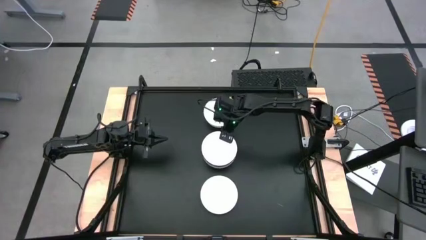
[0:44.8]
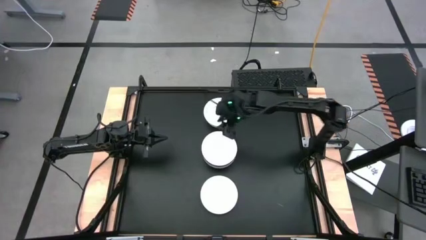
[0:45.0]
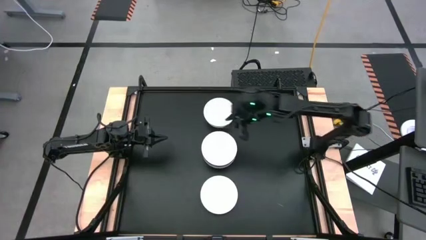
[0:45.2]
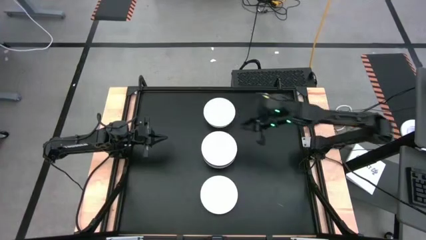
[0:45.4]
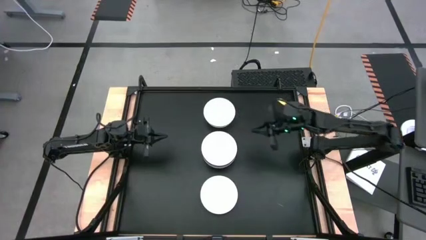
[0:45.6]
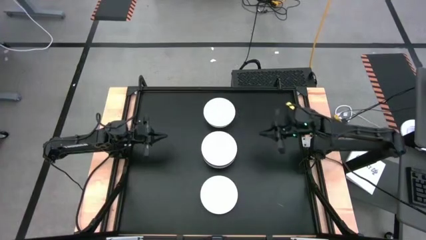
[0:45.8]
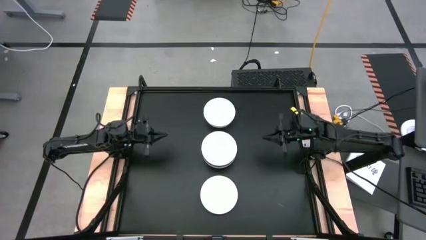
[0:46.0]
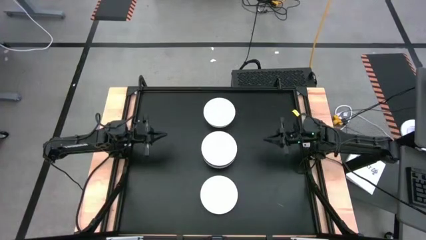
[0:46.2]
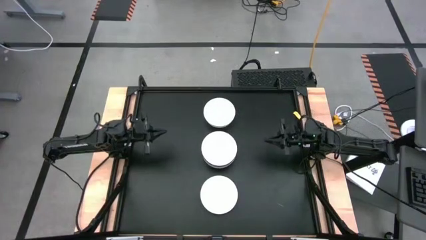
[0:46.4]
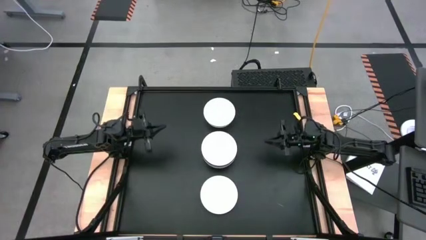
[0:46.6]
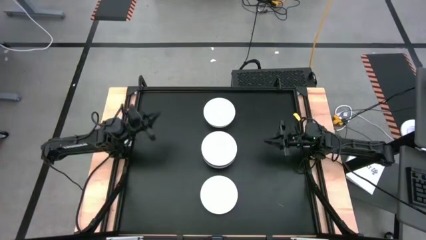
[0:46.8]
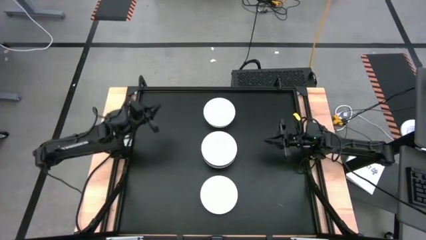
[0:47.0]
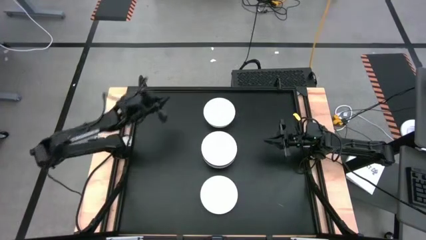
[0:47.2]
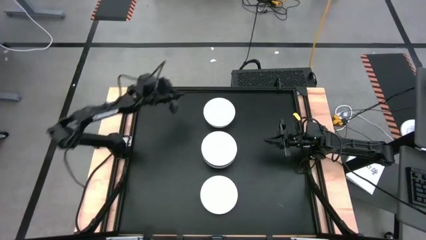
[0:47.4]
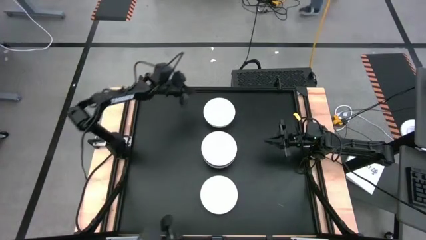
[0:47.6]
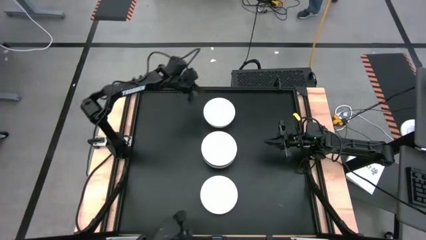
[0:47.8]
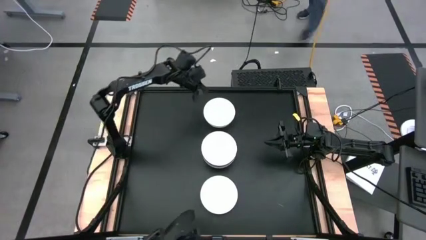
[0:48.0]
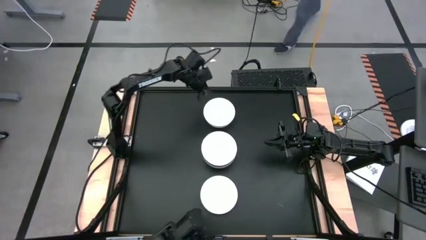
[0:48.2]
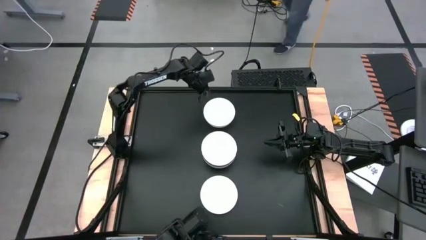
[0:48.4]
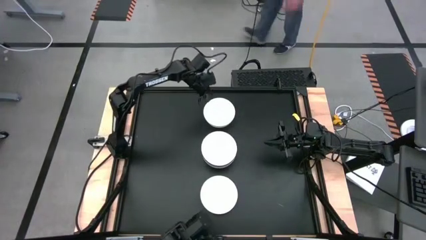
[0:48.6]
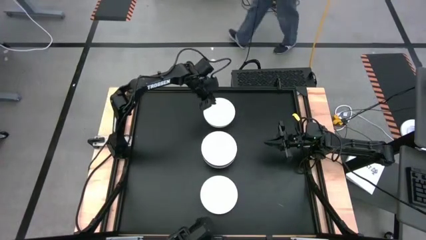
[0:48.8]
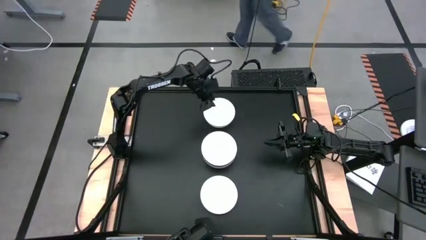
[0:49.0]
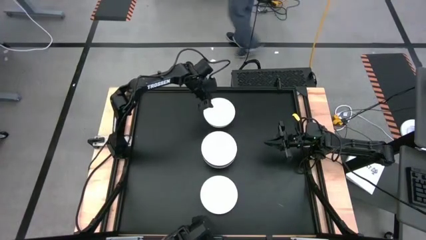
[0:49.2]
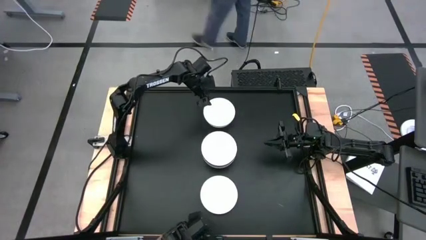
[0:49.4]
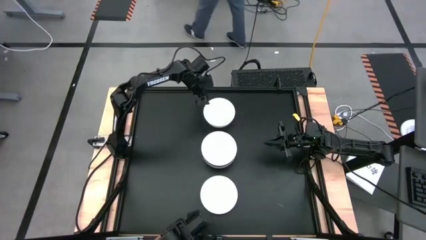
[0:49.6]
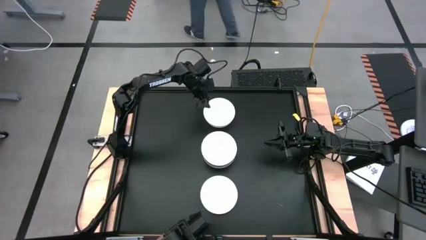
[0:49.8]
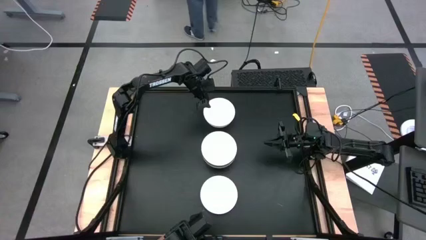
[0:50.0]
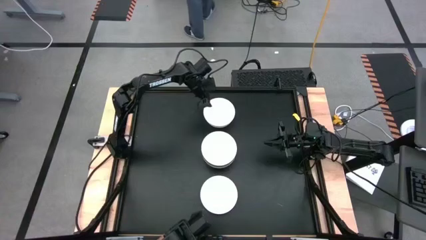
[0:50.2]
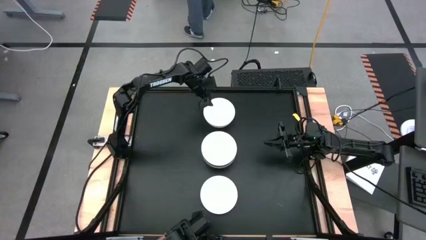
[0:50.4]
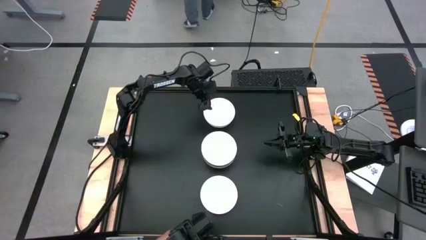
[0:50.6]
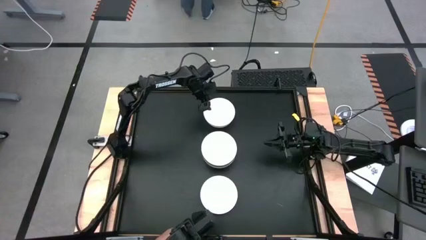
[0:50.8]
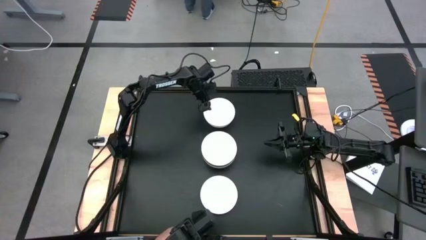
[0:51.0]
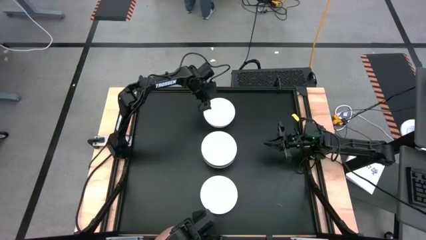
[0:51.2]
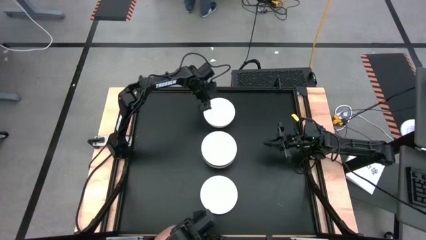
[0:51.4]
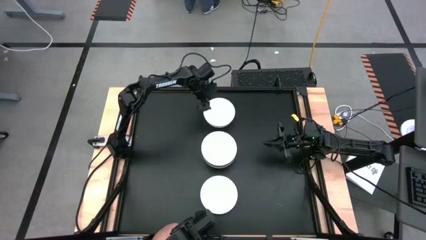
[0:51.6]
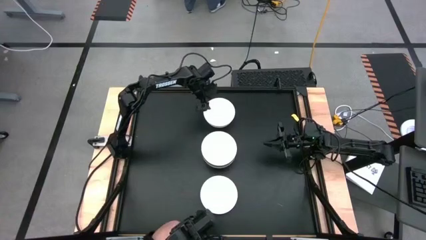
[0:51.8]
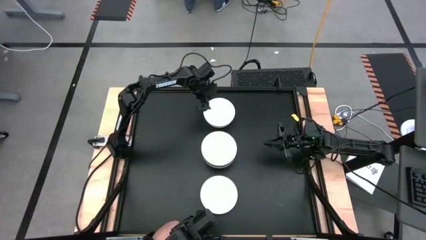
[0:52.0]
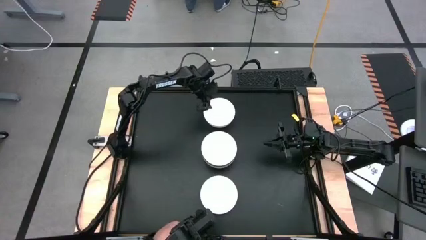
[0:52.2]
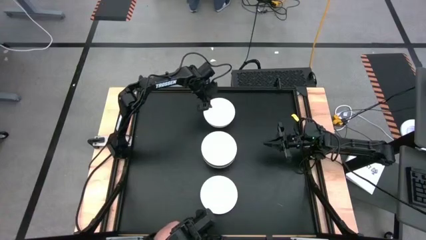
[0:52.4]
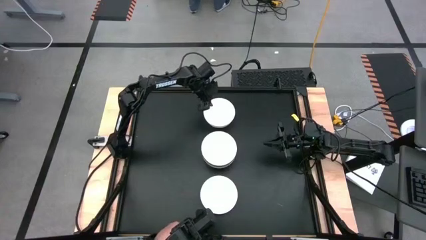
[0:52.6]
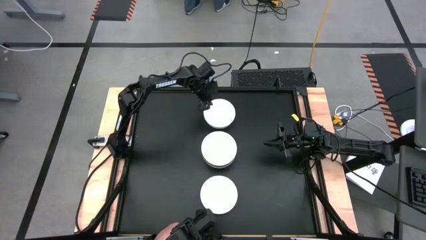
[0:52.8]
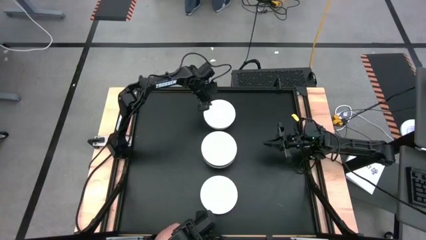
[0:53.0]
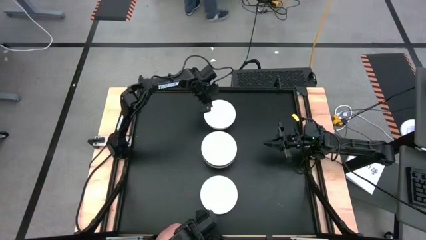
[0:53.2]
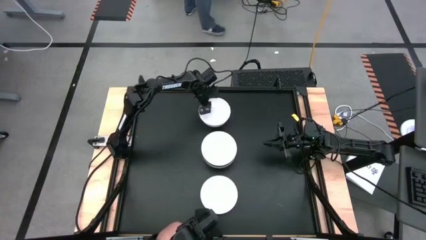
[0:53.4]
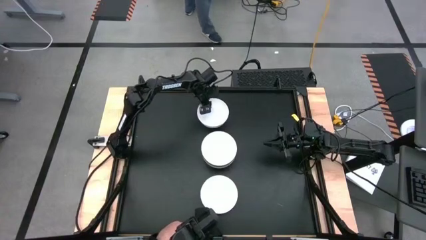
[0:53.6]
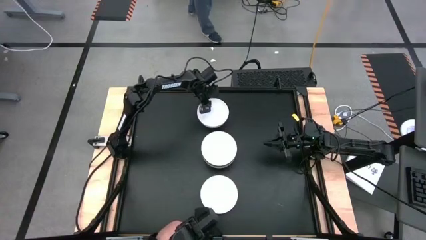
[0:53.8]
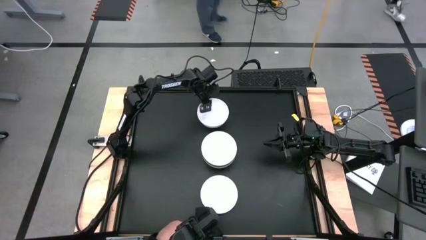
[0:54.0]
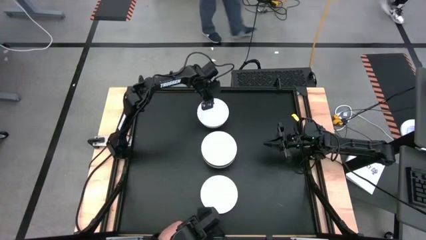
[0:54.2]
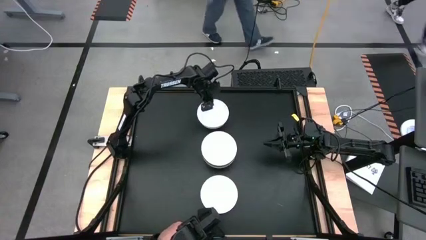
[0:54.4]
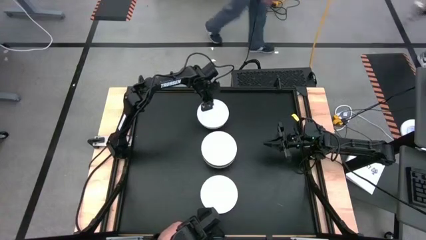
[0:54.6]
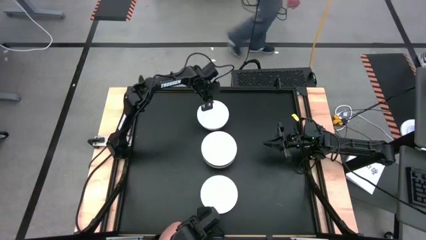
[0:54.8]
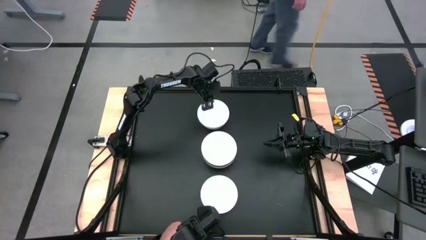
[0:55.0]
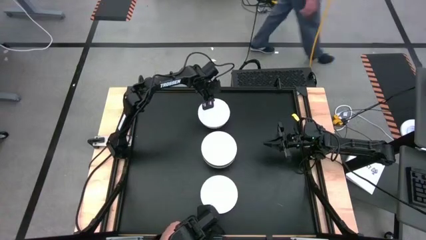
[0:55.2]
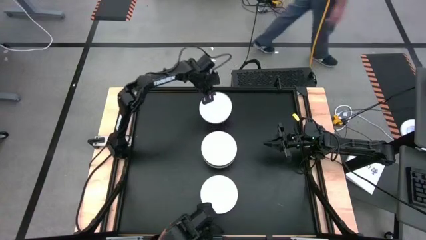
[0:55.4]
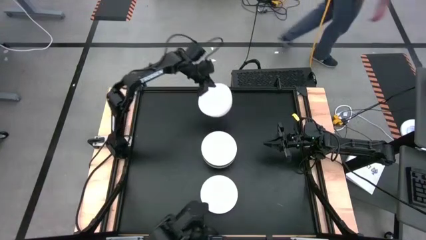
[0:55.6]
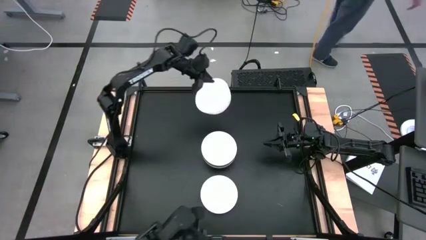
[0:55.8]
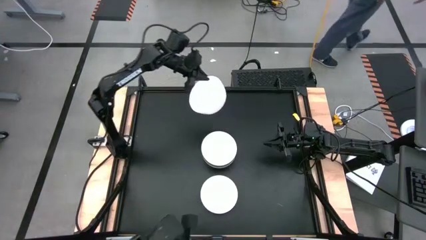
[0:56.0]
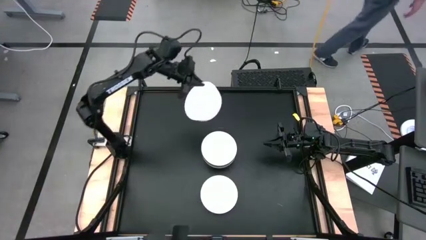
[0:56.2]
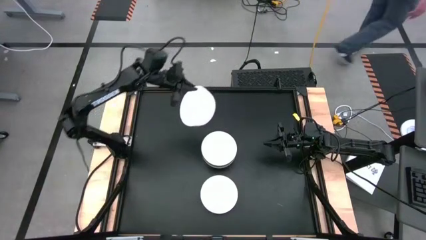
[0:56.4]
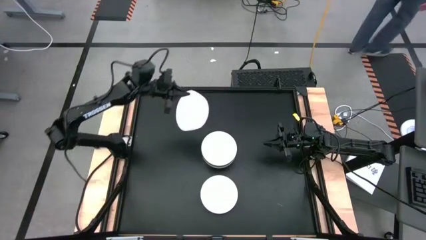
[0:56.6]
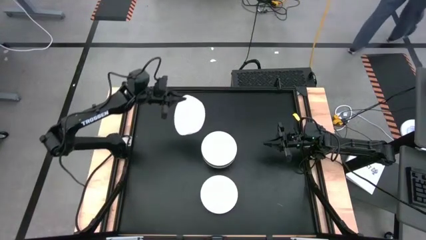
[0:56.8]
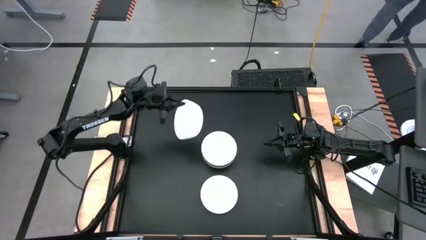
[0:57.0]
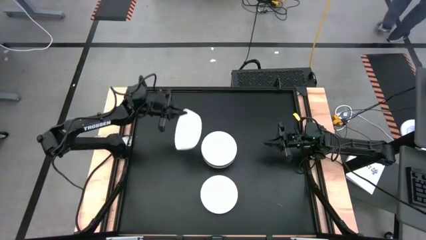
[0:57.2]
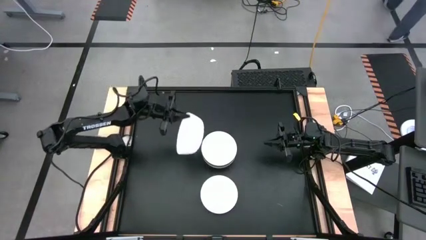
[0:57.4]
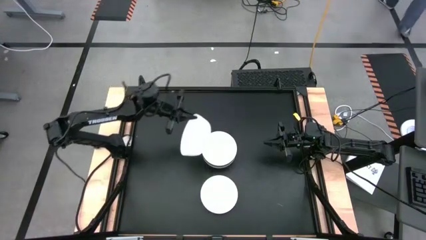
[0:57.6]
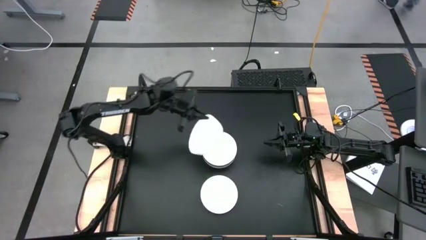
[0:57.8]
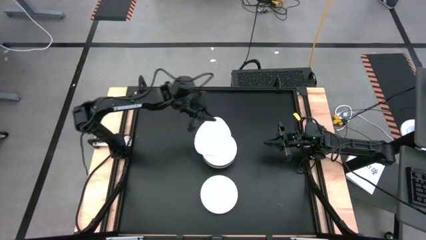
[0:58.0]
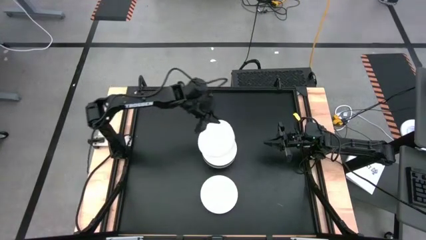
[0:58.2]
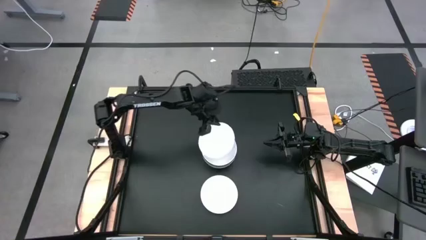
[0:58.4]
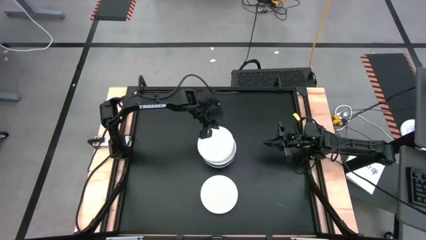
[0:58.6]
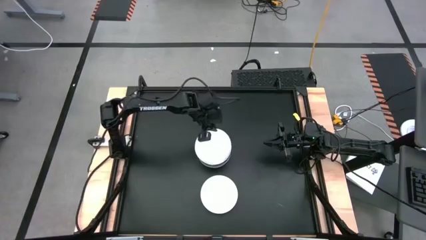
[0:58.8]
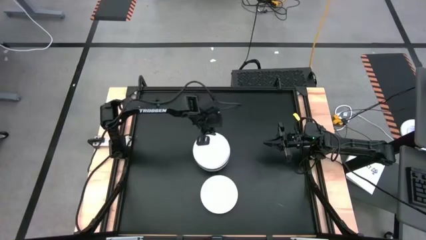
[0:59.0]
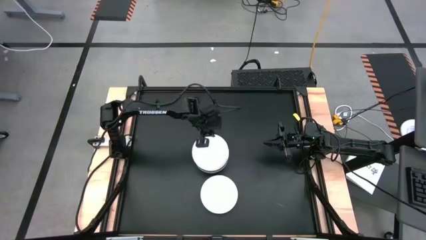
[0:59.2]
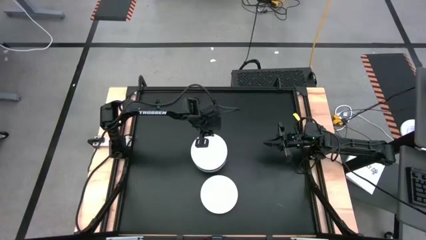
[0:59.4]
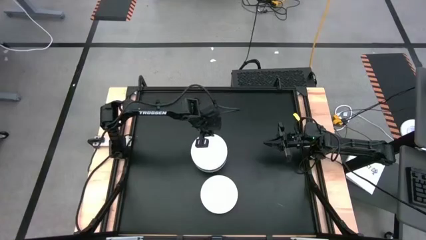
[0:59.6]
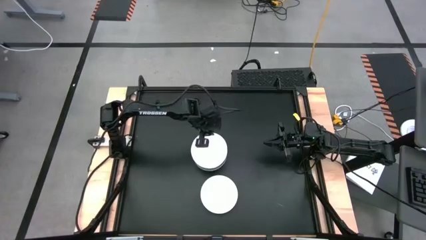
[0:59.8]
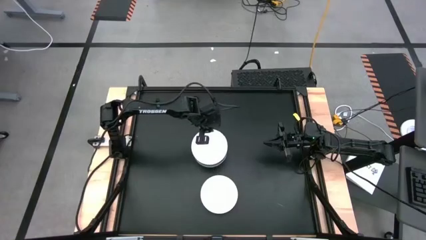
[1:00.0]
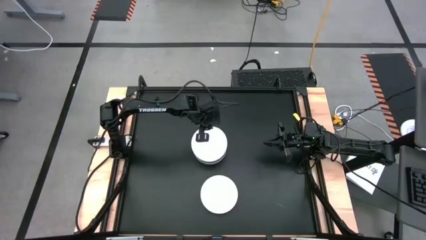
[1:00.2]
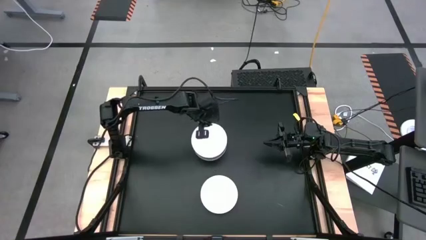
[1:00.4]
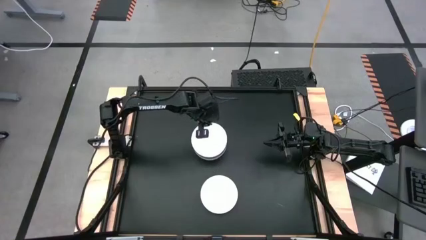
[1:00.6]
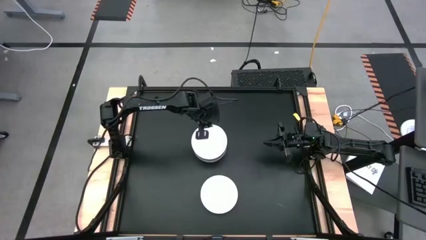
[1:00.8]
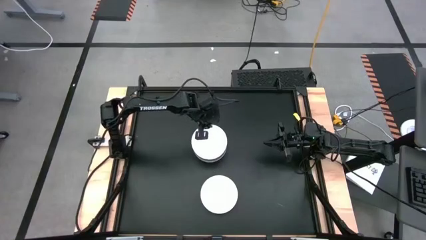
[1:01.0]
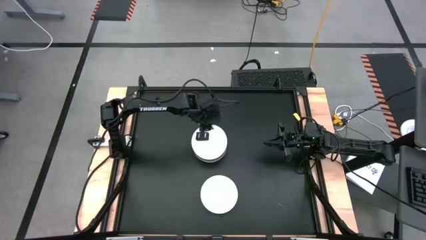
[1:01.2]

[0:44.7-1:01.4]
Task: Nest bowls inside each other
Stack the top white bowl on top of the stacked white bowl
